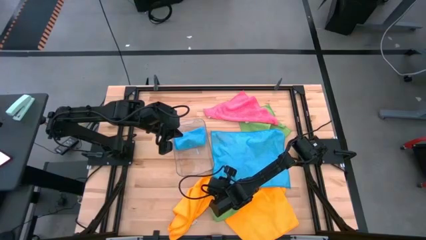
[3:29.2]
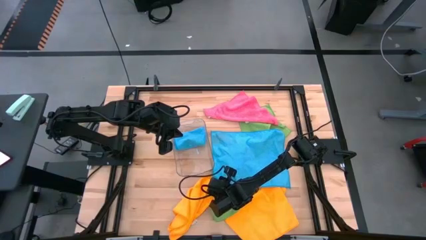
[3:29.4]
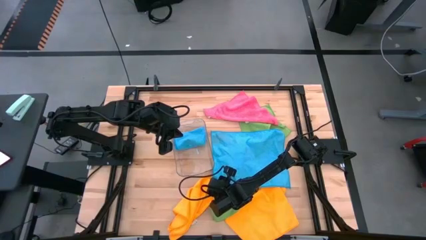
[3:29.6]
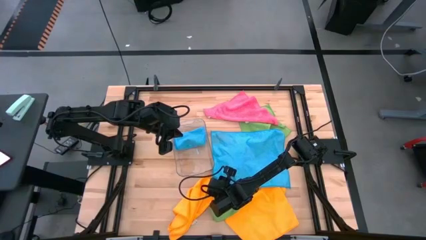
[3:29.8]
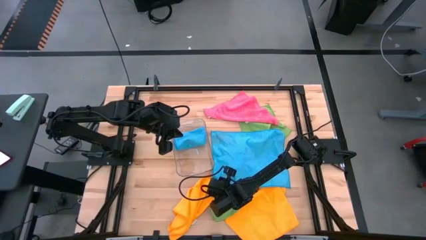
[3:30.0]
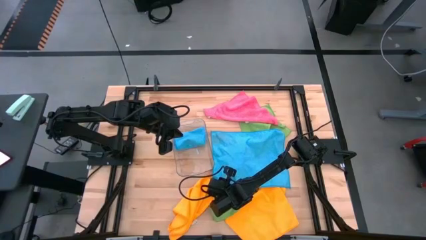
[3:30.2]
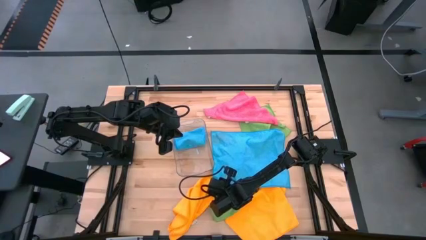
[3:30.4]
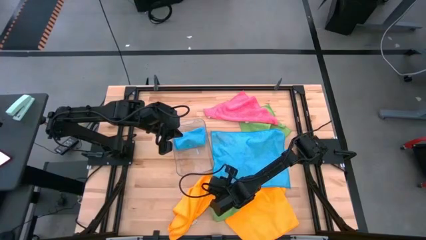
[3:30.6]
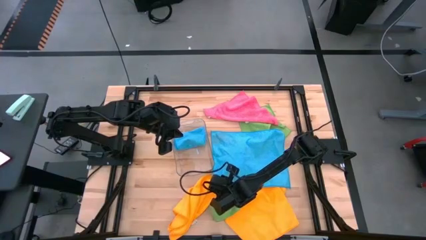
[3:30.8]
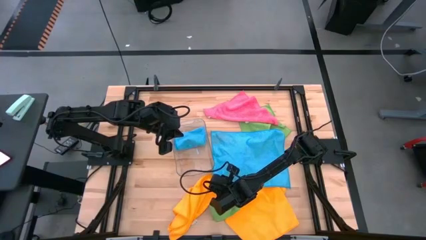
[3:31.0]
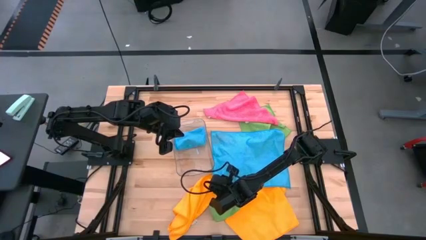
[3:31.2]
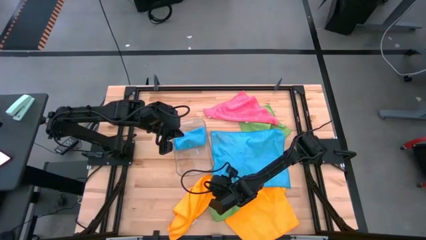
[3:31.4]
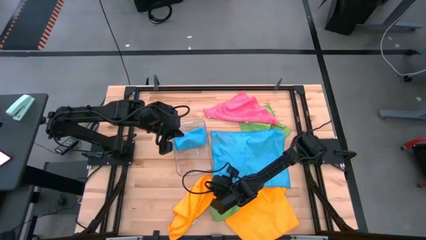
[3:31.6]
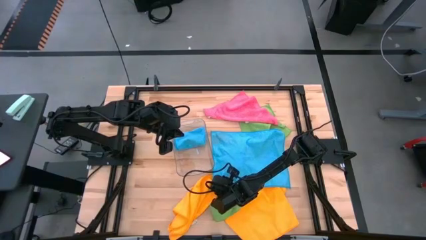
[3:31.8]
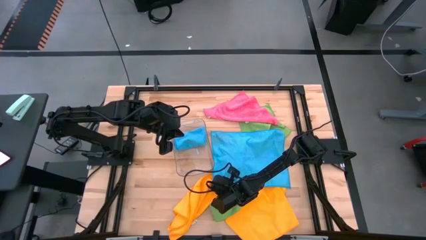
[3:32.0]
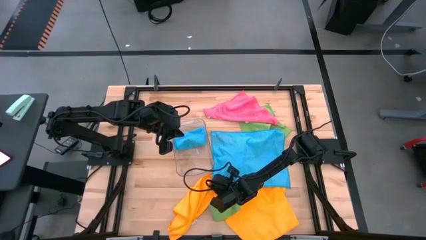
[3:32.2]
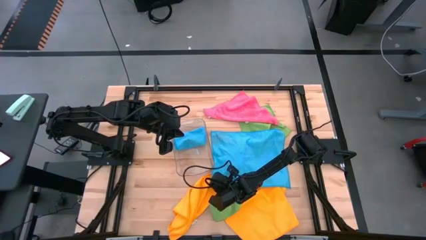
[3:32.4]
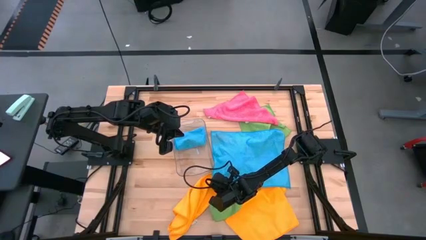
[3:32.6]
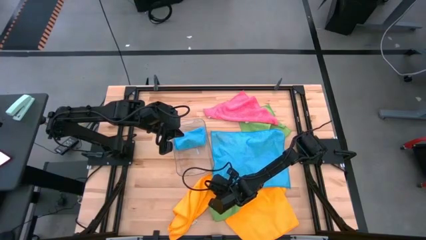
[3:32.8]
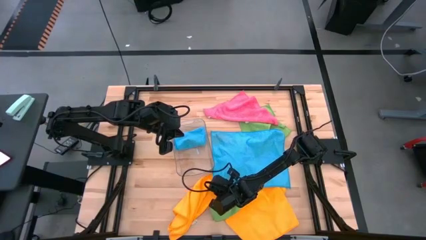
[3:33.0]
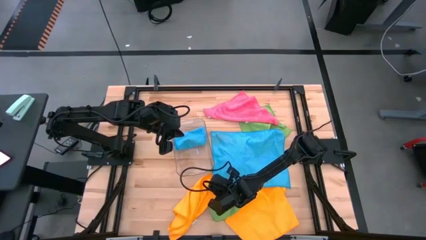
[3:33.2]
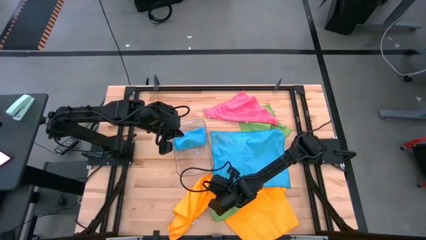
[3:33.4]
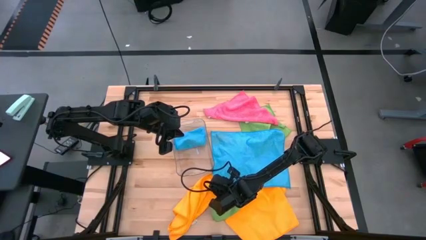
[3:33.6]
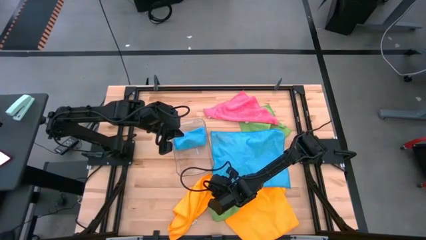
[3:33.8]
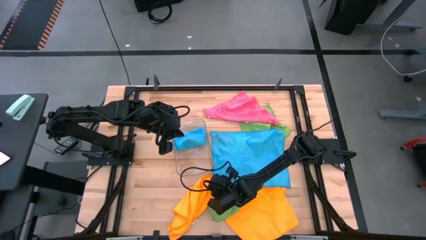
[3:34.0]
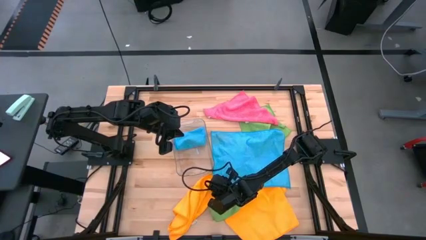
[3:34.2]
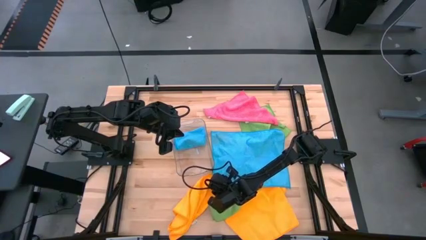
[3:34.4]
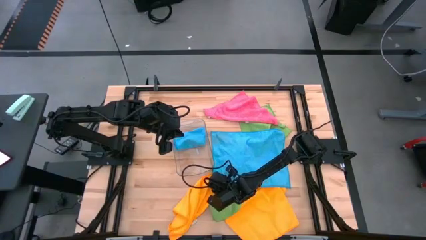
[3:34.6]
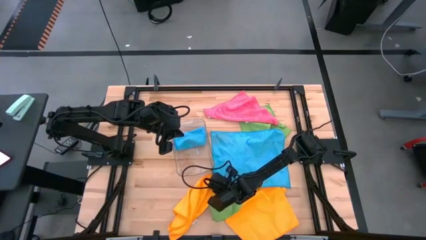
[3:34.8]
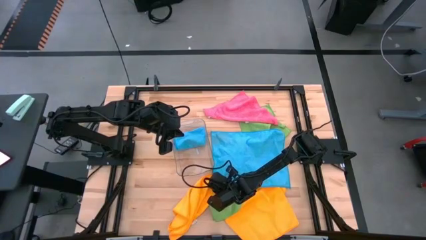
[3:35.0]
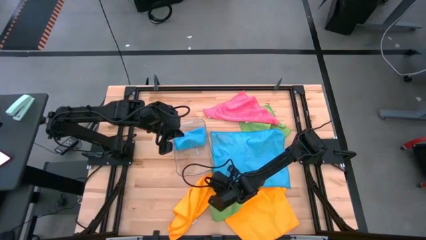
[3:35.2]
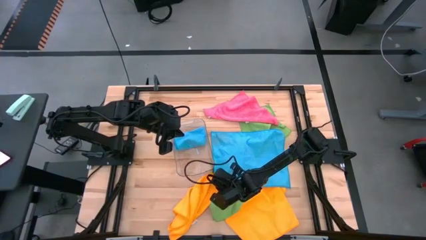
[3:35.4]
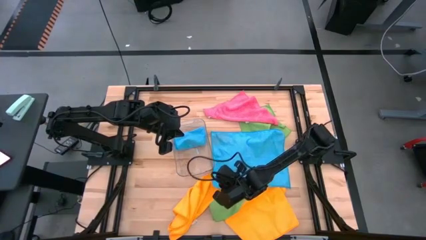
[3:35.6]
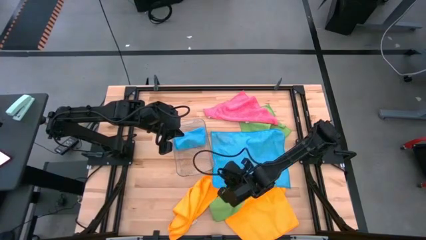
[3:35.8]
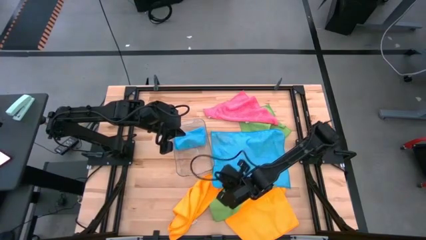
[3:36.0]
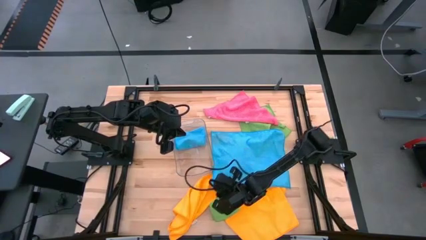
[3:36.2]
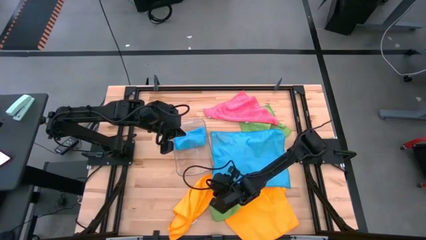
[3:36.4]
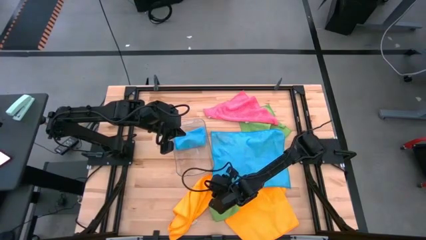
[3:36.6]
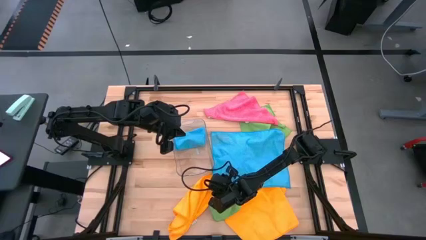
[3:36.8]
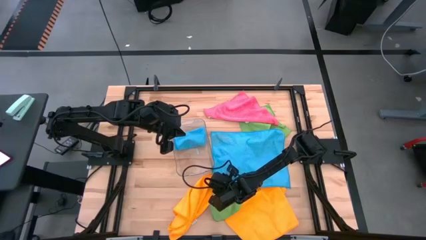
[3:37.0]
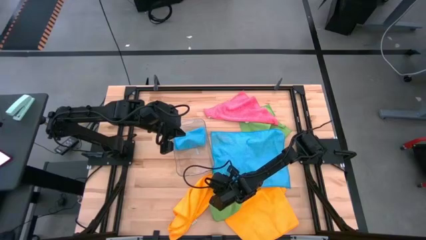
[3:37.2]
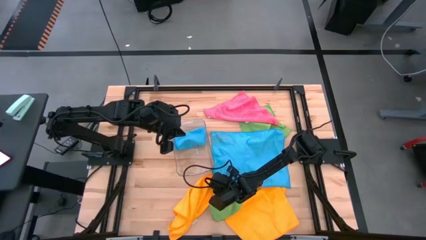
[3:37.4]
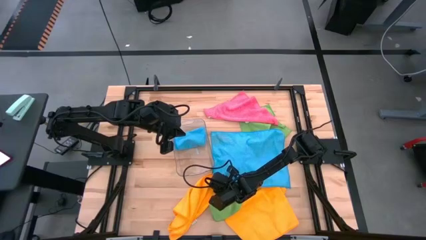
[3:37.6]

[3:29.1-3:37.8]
Task: Fold microfiber towels
Fold the blue towel

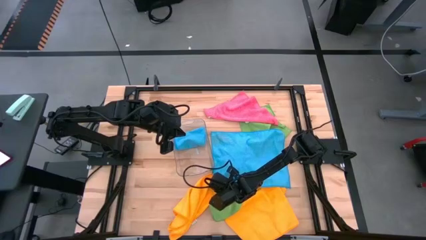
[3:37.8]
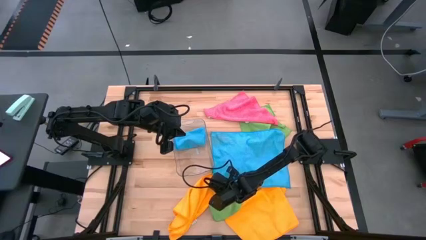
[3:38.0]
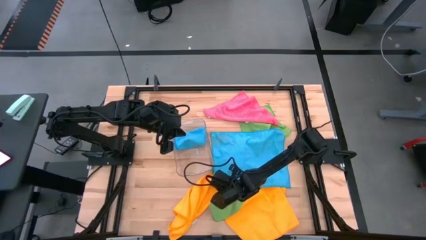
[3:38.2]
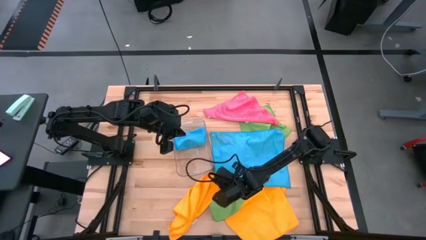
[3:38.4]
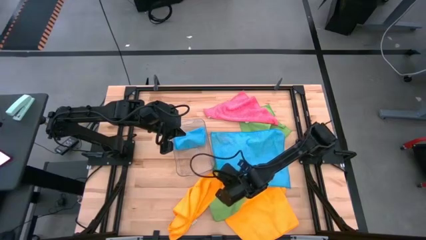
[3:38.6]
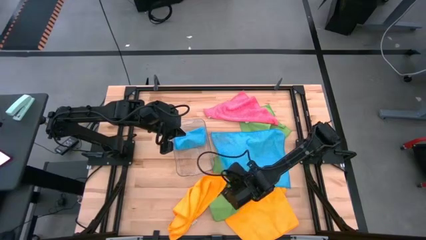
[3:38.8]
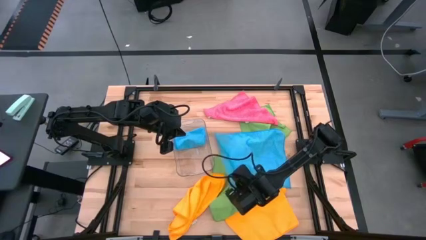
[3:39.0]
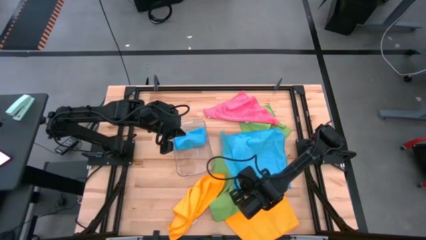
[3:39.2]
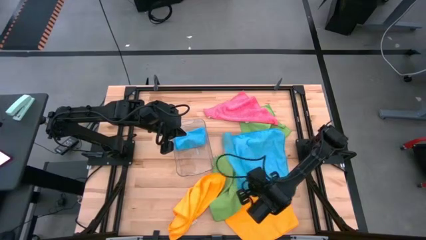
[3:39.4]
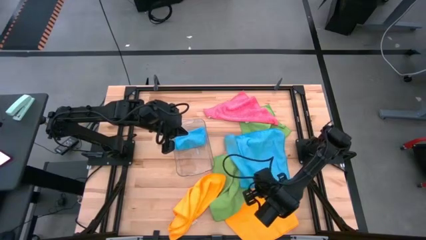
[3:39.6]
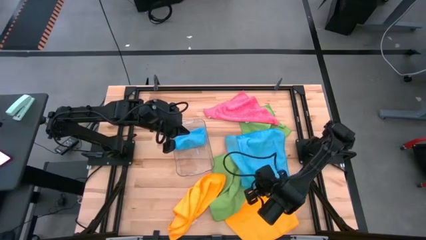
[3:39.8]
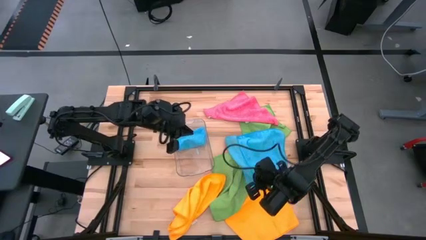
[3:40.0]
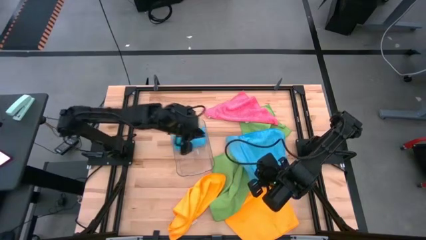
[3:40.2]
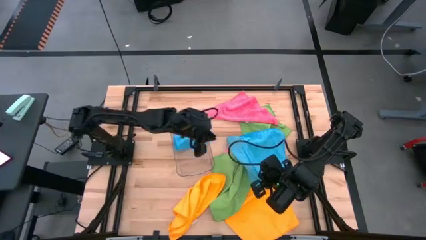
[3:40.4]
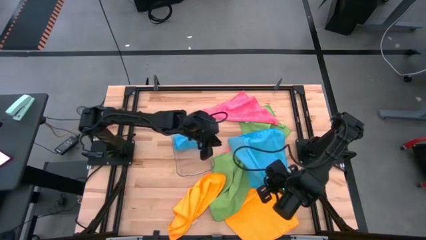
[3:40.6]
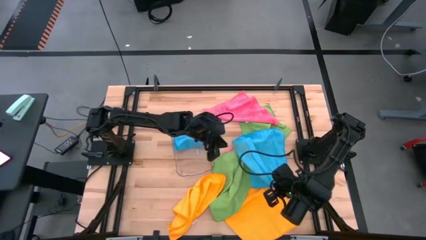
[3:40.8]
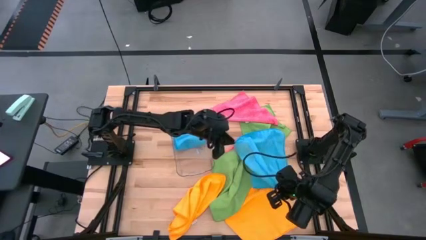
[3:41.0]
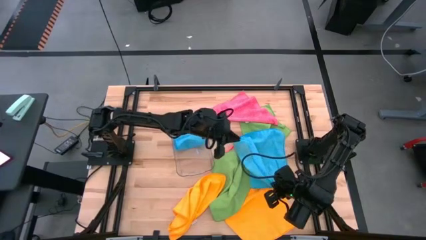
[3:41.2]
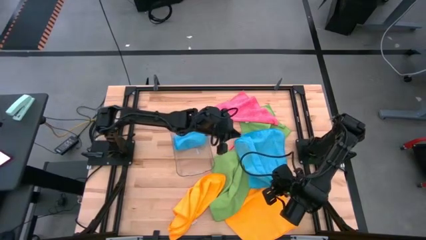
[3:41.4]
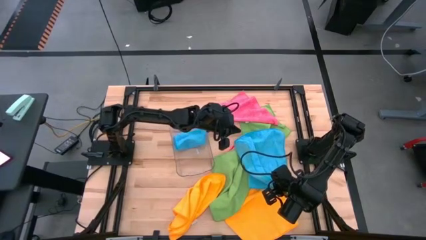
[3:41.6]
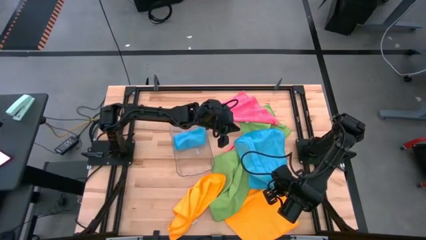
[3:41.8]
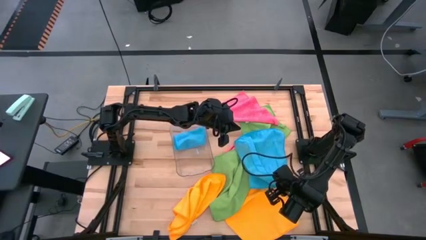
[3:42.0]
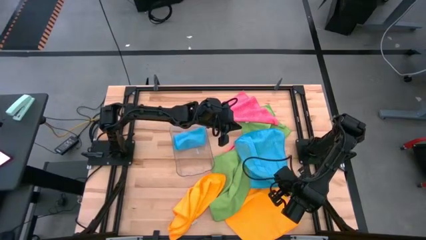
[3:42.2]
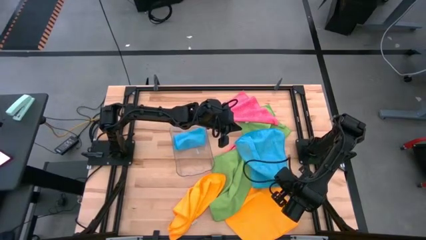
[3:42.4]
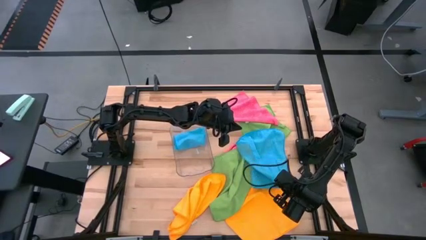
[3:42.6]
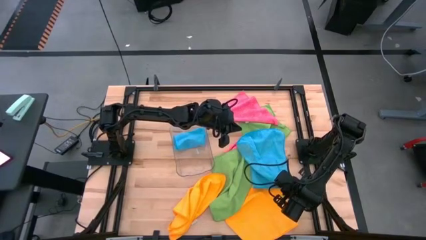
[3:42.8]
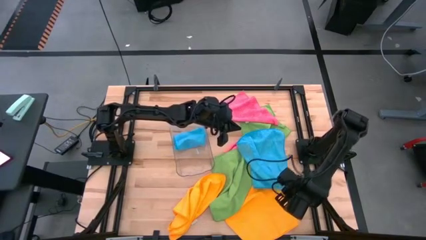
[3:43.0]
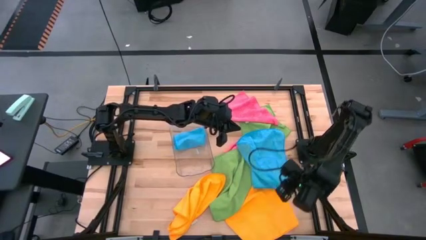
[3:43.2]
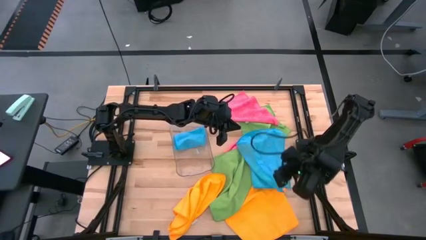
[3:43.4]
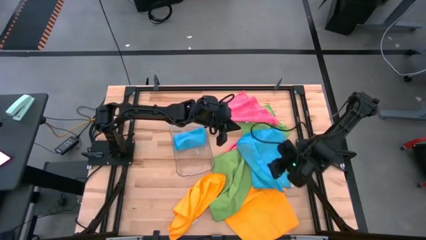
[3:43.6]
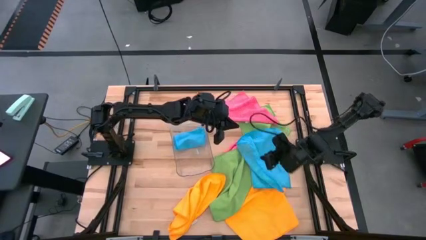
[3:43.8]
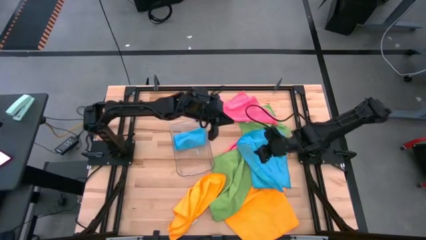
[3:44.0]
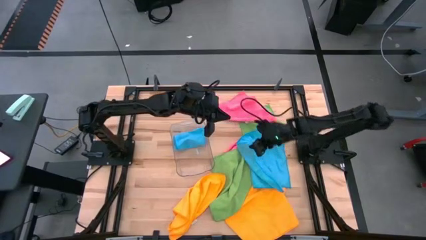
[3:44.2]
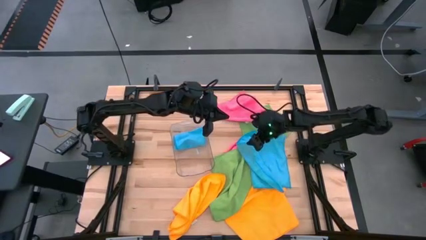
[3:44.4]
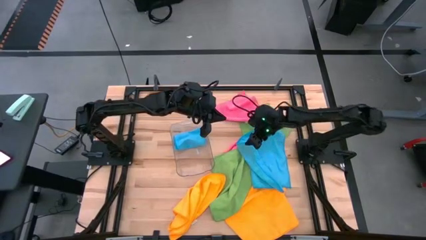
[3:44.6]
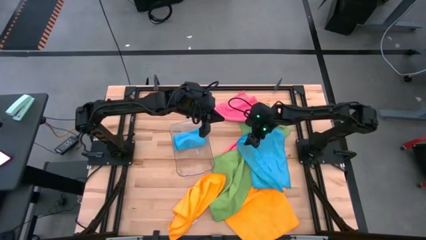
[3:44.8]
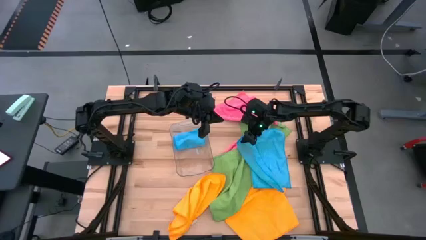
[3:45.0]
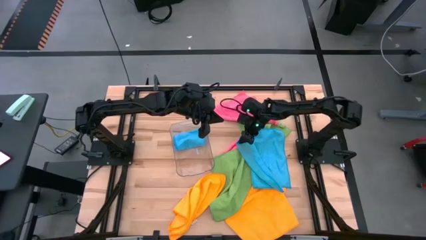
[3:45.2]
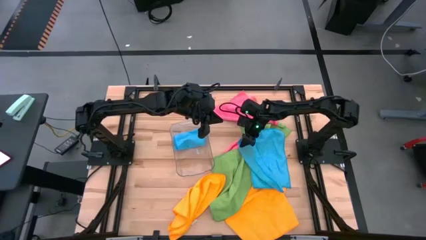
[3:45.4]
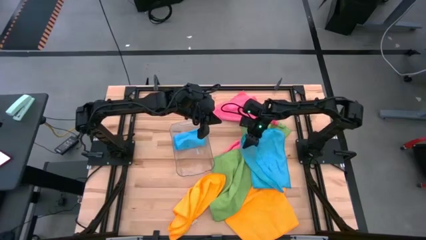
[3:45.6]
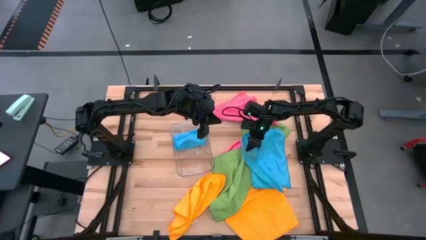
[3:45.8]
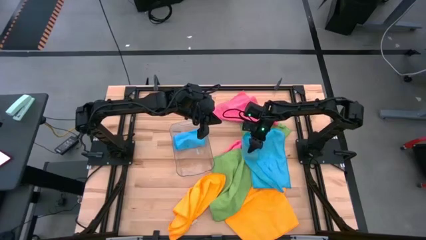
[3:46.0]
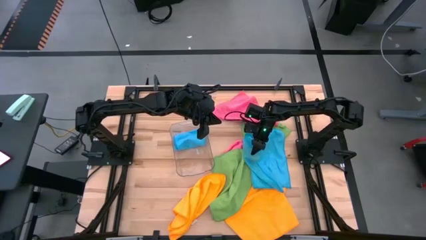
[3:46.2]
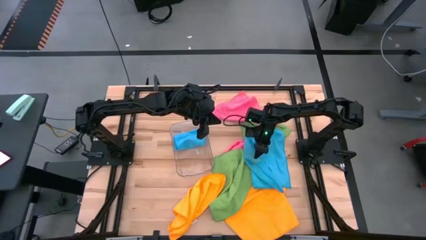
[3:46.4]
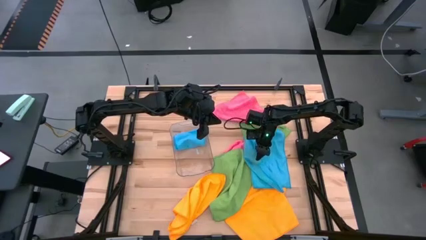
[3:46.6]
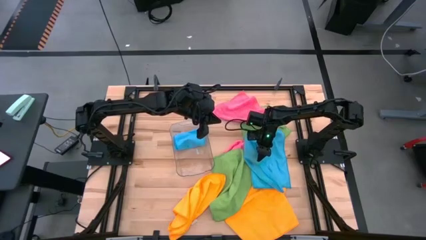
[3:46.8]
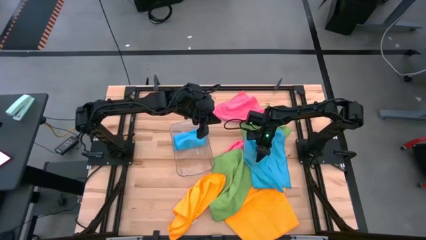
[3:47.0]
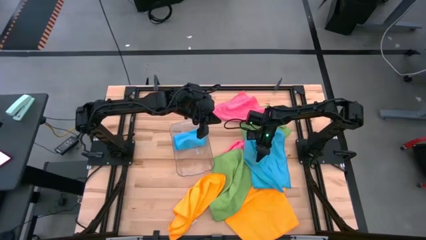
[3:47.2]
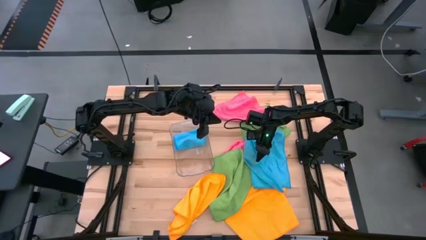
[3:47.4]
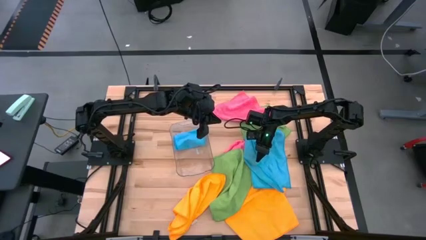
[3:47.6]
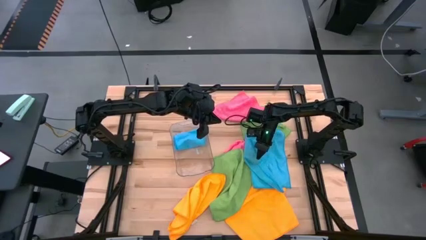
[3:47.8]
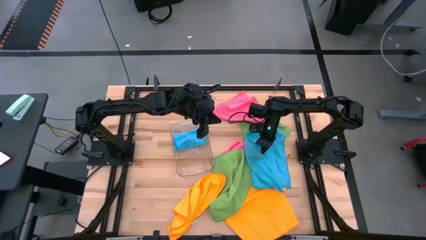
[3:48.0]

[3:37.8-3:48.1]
Fold the blue towel
